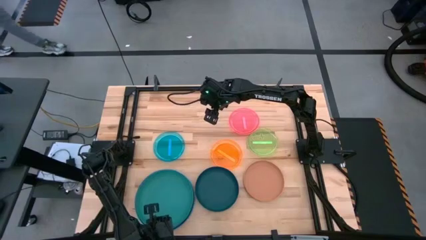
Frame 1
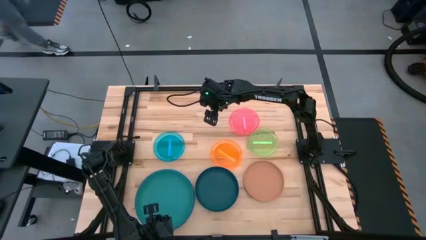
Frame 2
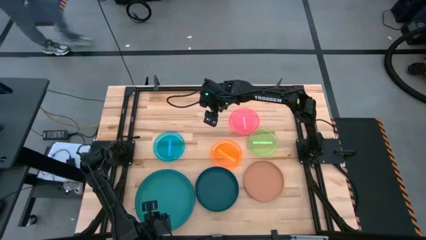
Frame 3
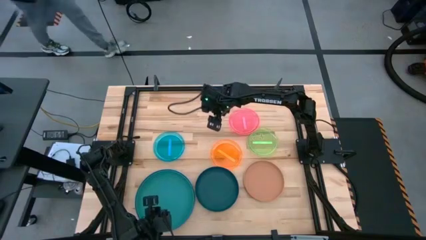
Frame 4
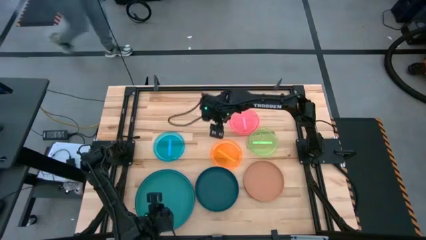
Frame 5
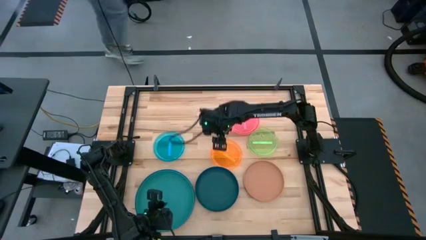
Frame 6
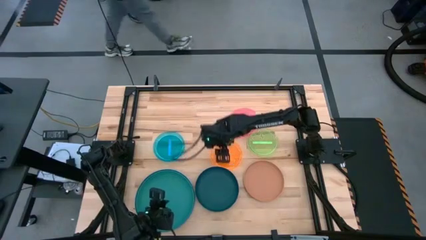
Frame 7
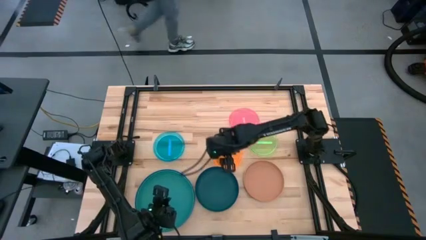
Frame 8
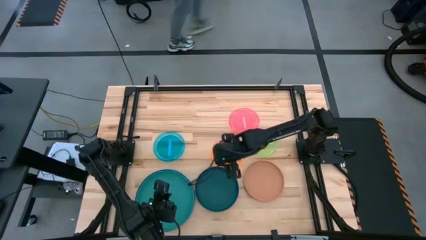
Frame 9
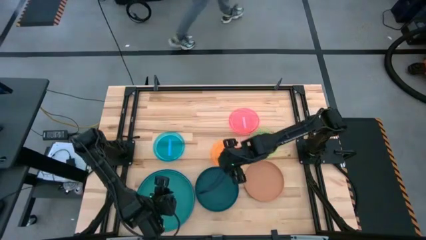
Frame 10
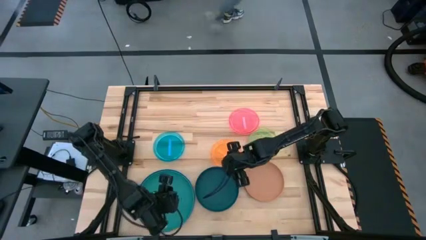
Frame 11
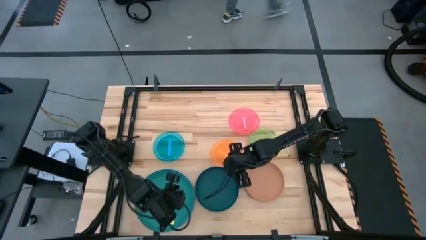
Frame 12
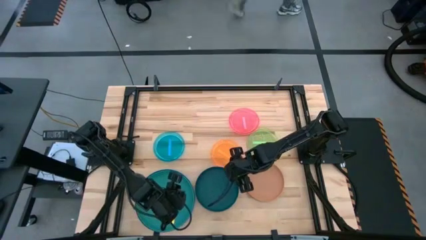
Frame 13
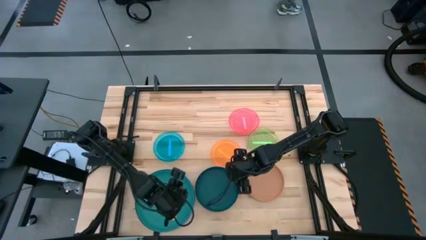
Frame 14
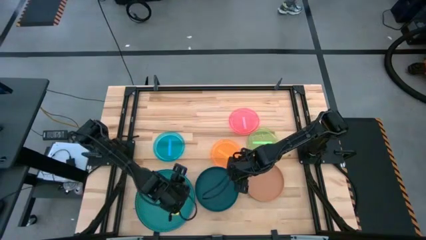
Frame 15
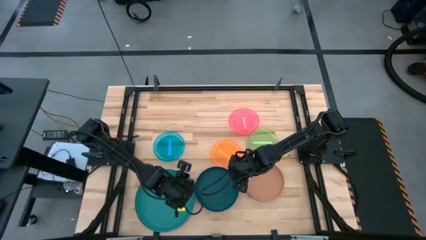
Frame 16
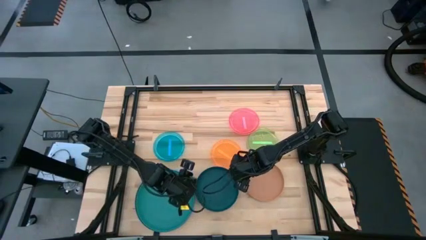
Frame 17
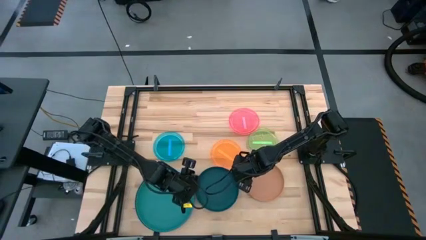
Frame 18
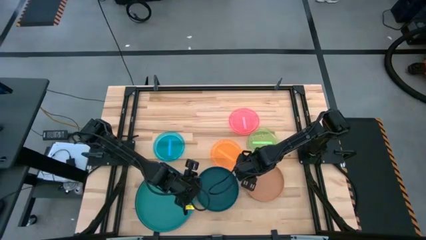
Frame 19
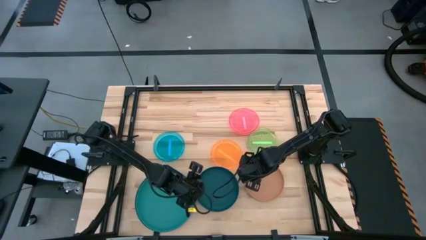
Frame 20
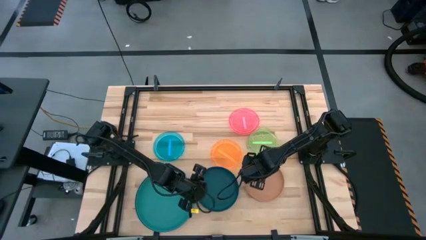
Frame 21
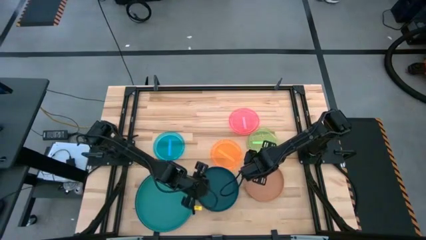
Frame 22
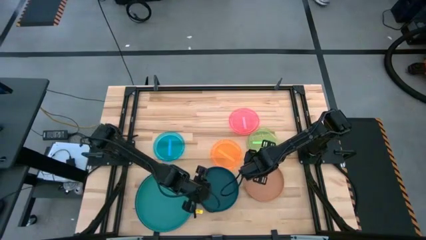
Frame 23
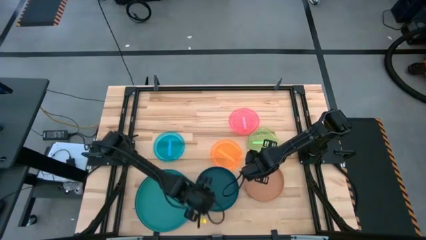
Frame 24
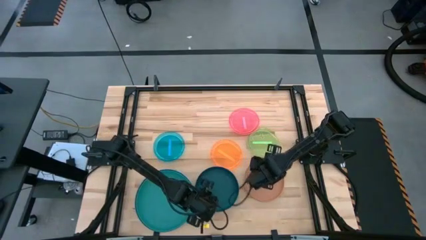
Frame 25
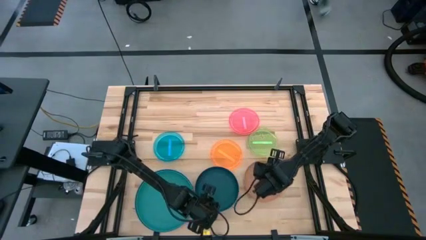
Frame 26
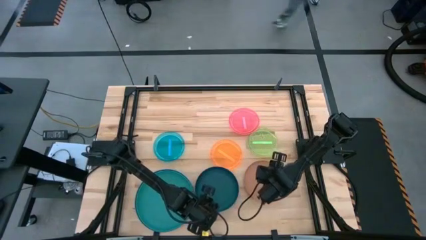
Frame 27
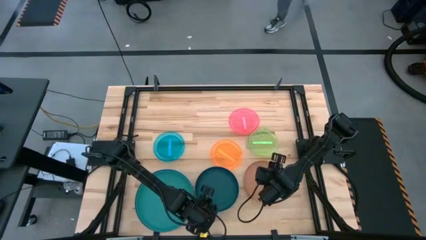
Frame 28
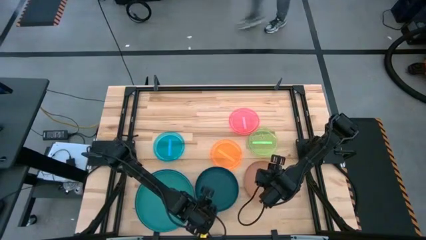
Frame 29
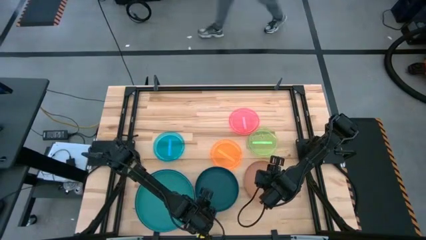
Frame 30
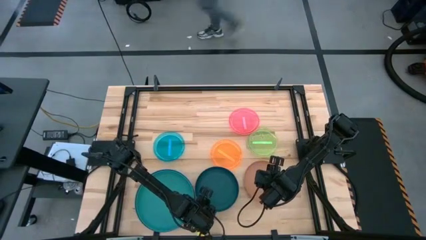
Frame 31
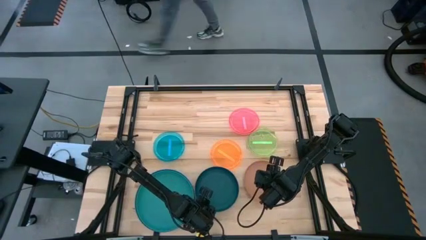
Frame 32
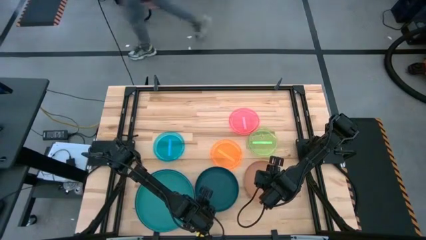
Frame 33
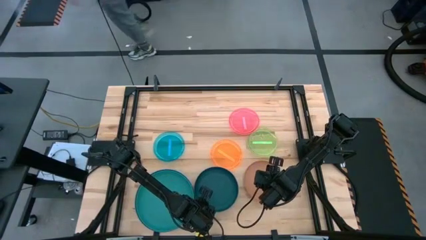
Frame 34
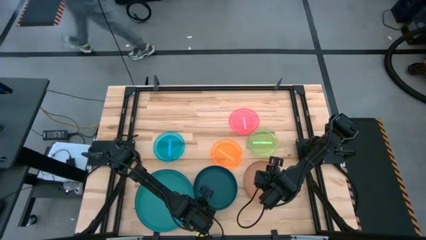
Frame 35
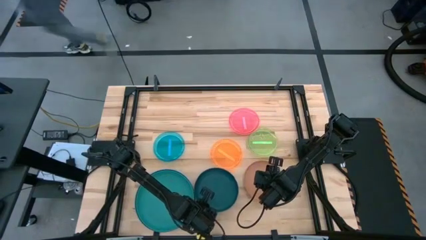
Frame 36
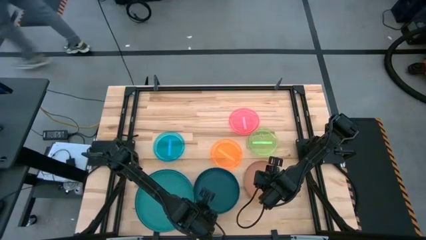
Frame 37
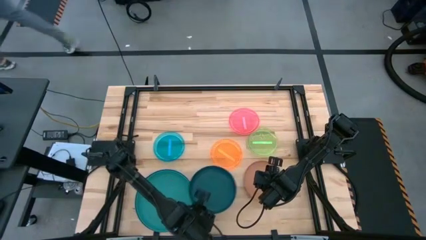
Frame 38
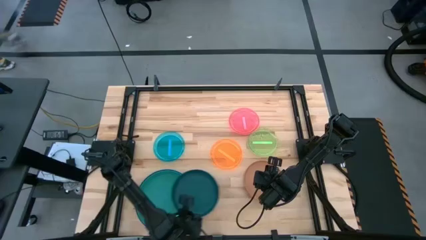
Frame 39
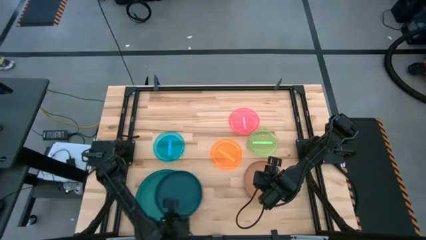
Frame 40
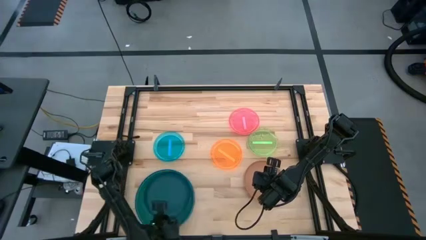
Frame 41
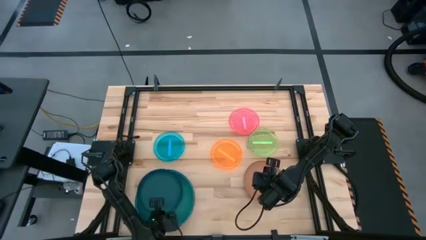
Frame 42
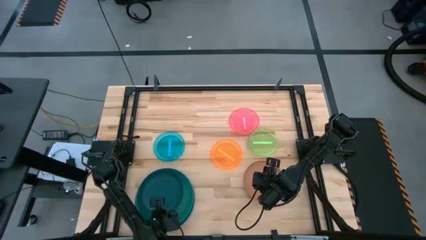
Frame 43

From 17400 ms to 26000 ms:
Task: Stack plastic plates
Stack the dark green plate on top of the green plate

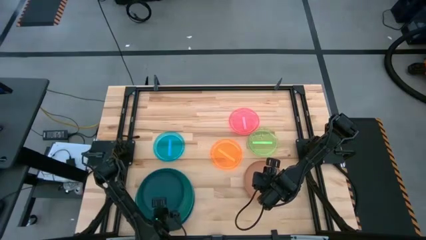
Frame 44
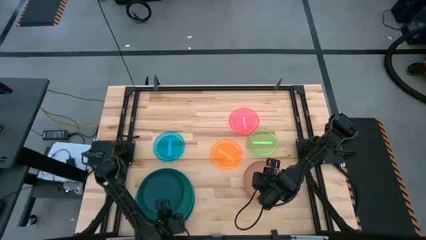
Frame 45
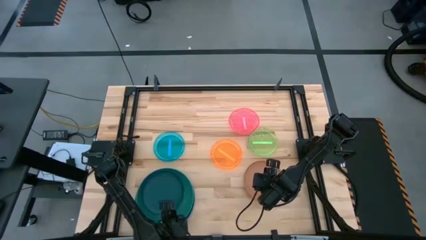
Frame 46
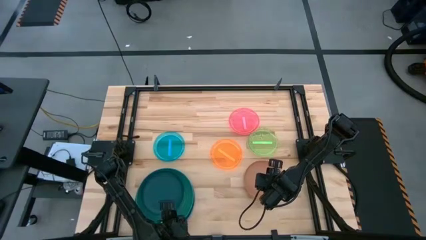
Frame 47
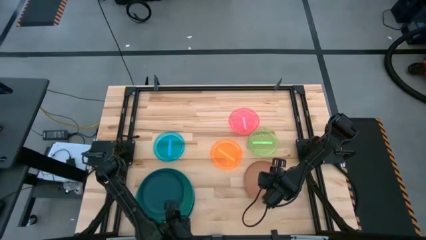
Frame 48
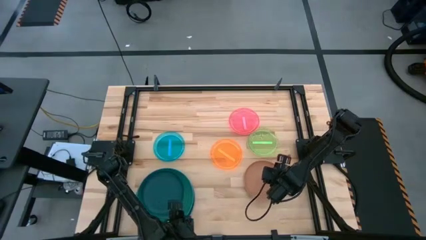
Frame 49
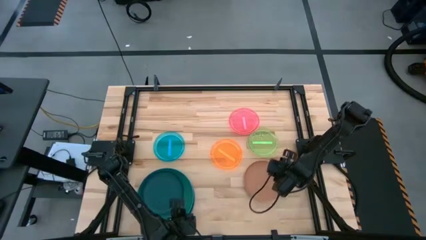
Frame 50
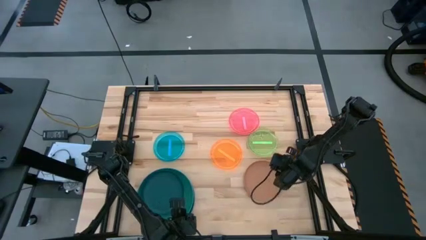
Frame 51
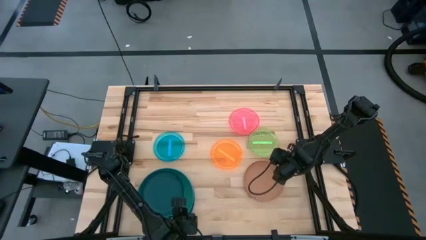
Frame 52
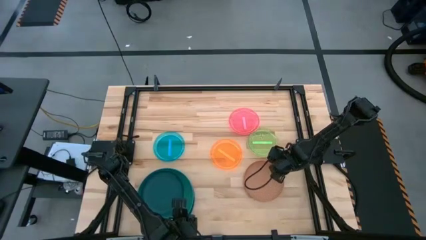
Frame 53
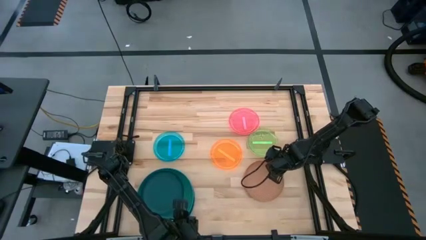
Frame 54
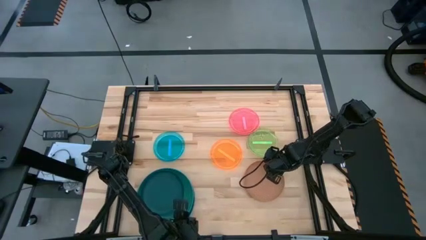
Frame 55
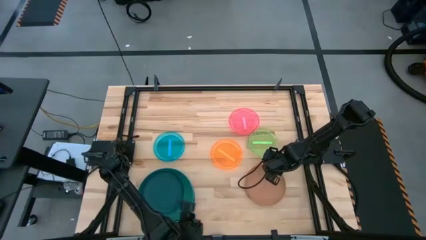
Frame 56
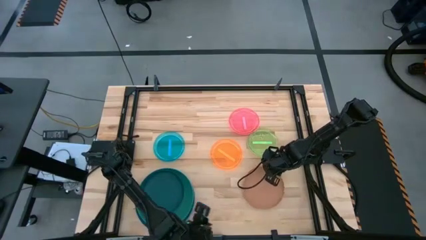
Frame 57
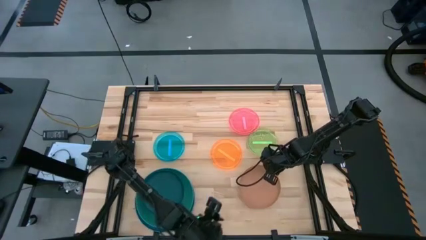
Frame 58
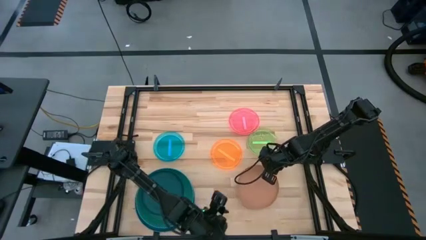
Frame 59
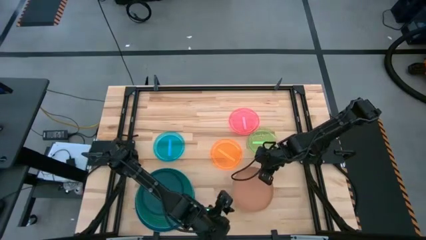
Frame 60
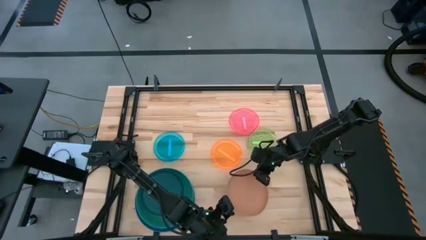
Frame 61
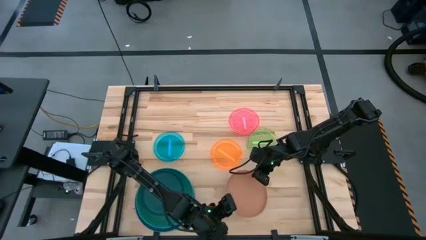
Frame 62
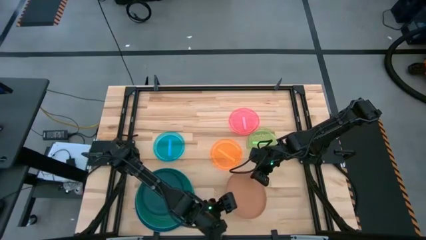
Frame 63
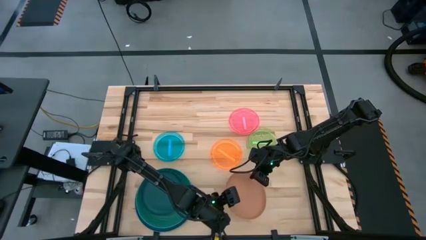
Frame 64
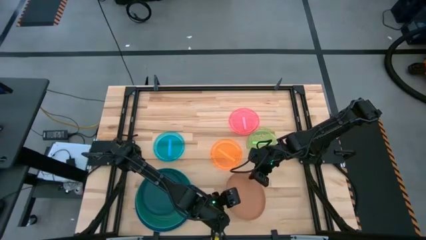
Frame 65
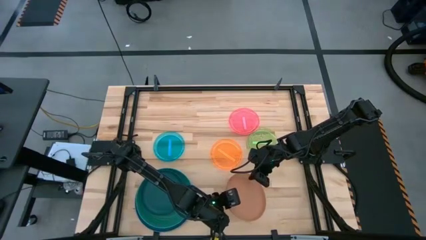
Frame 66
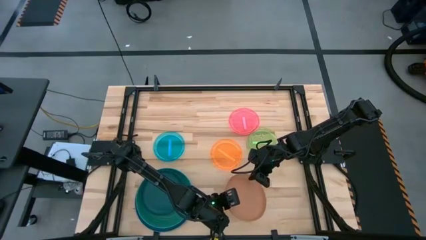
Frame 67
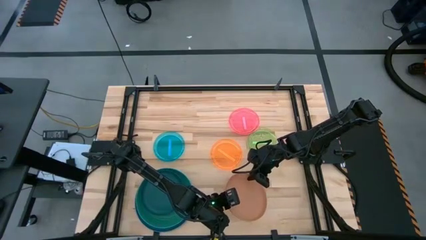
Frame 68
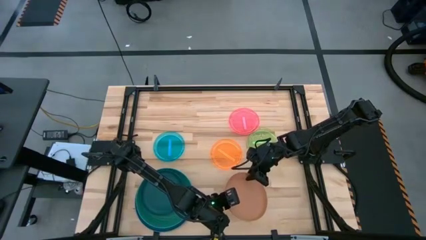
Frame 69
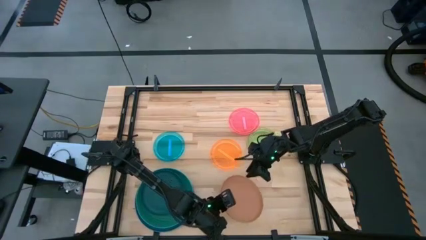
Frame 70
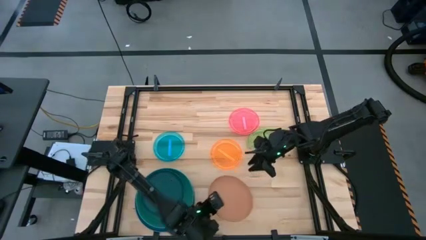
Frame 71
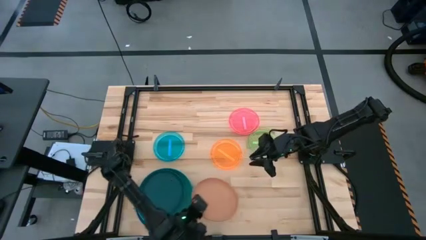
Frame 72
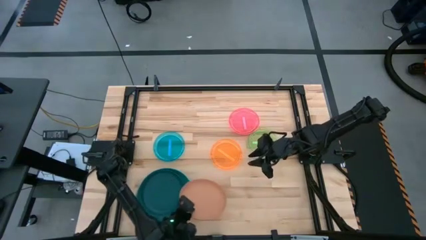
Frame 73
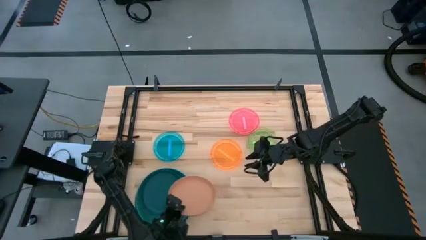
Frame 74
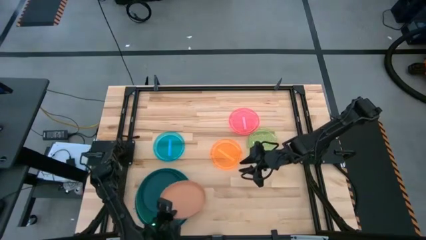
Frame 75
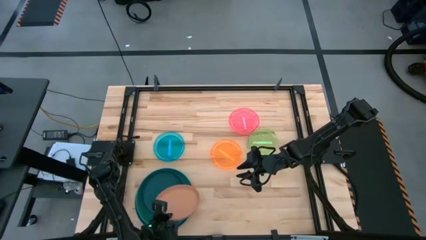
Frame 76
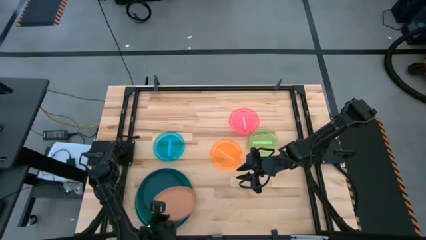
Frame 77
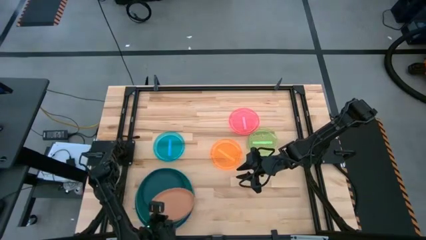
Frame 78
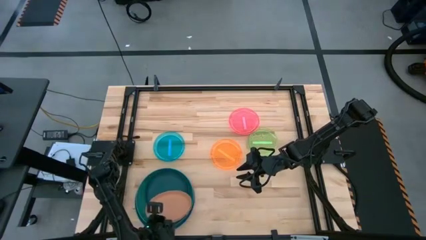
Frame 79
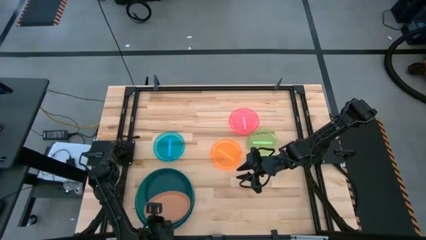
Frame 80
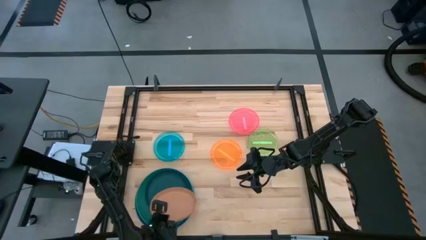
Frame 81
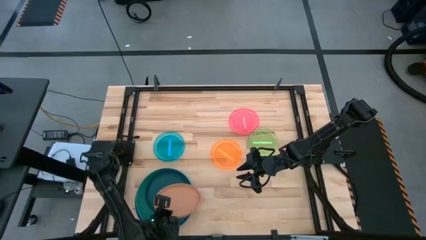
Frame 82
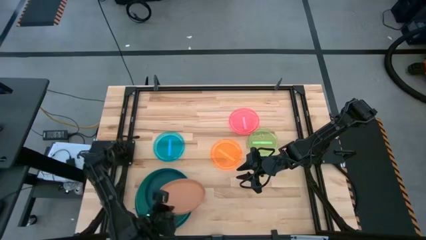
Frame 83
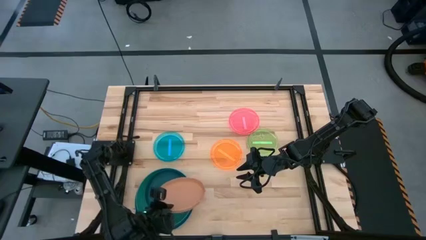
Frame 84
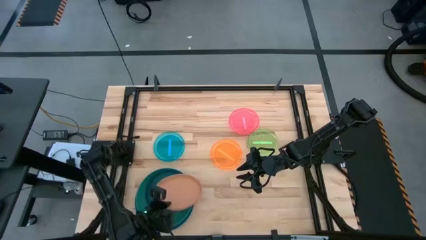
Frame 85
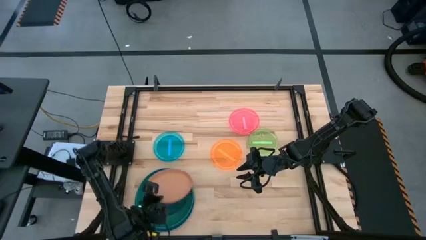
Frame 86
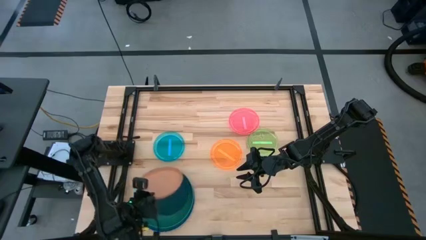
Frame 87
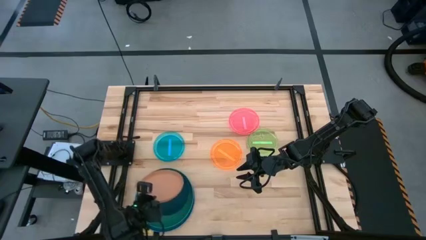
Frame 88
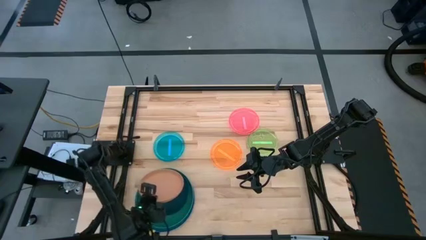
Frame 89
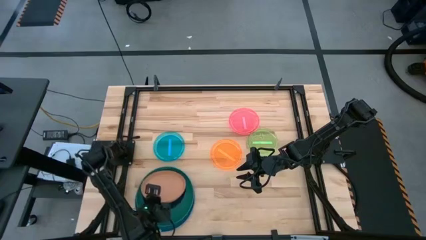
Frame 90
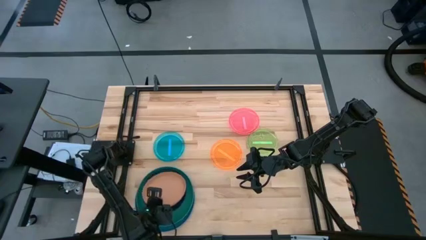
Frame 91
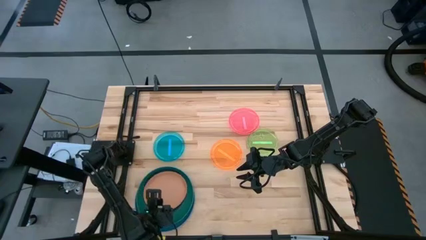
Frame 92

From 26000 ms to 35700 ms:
Stack the orange plate on top of the dark green plate
